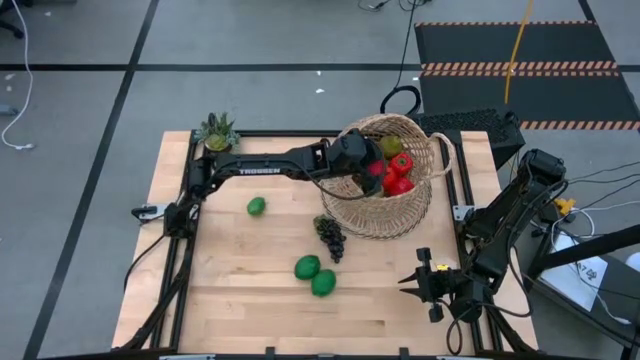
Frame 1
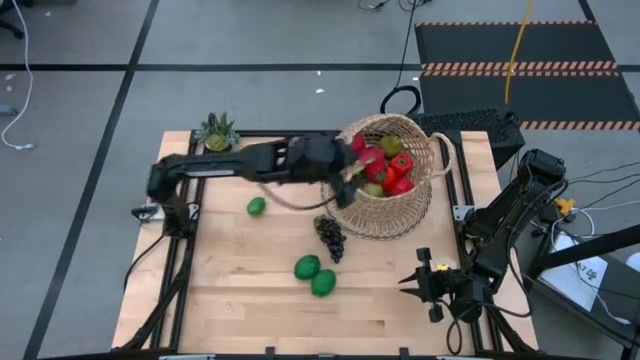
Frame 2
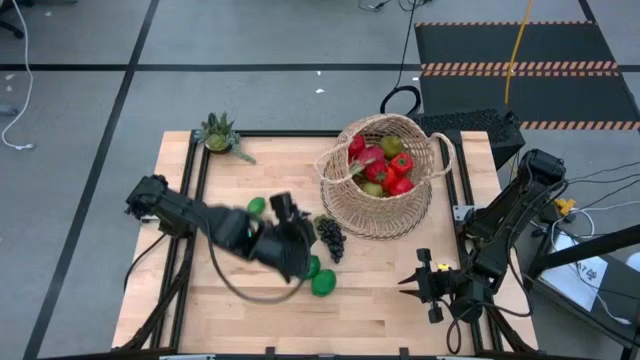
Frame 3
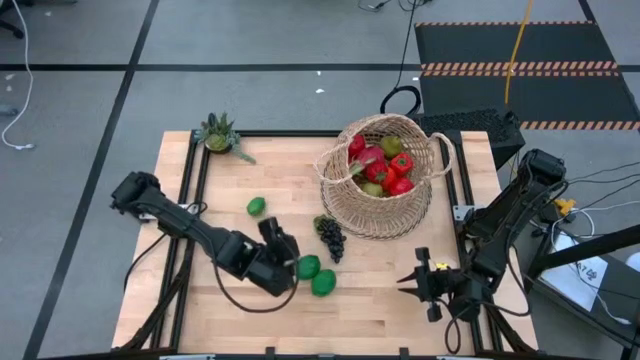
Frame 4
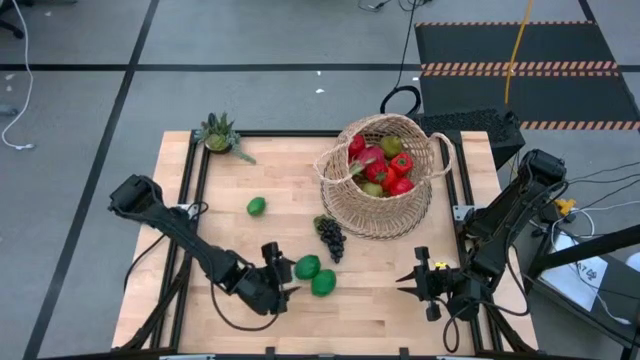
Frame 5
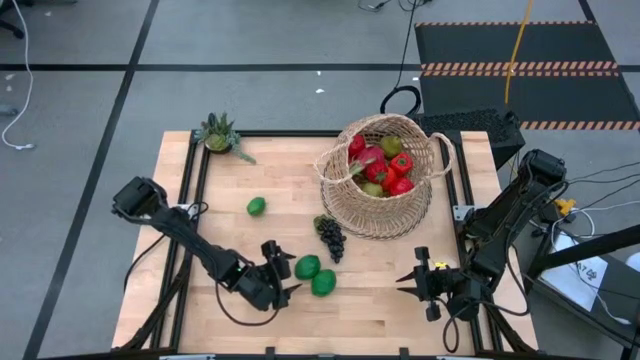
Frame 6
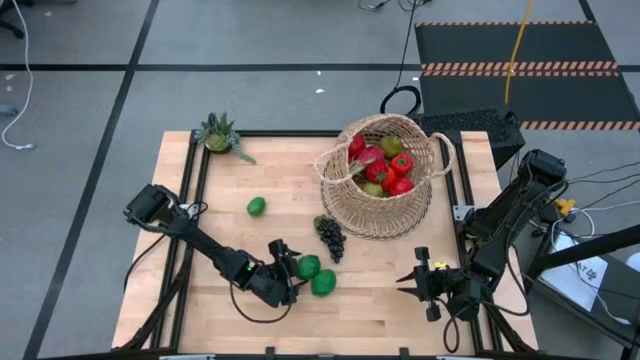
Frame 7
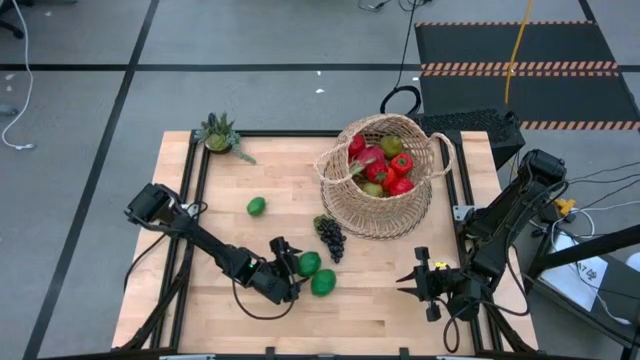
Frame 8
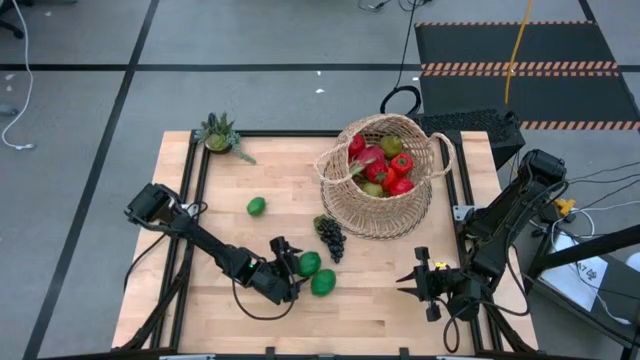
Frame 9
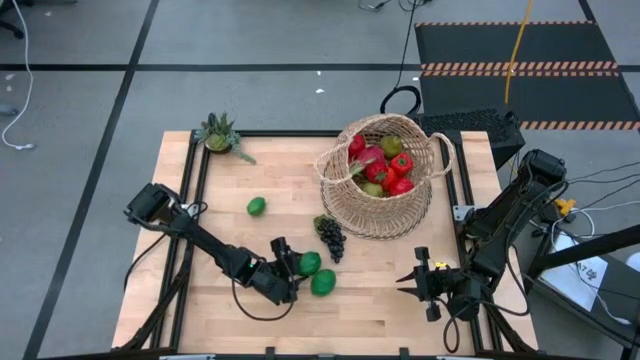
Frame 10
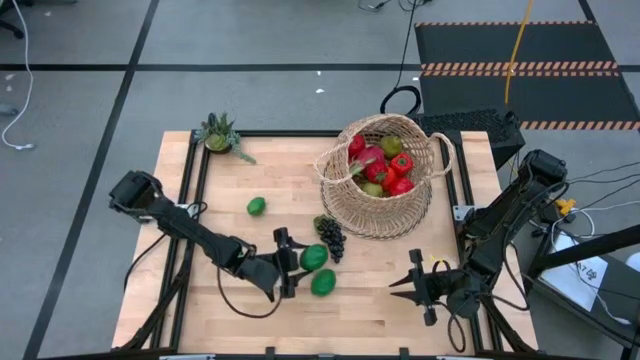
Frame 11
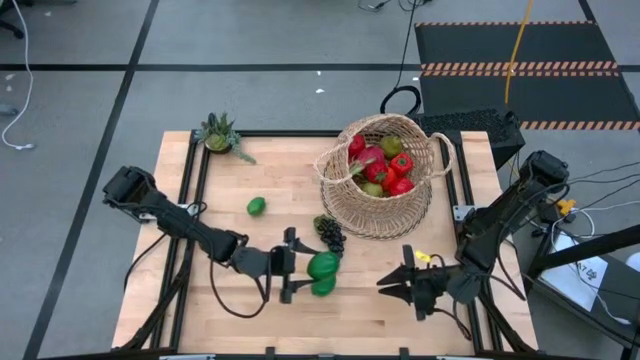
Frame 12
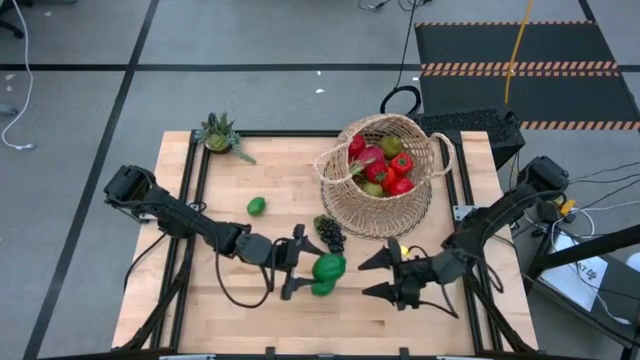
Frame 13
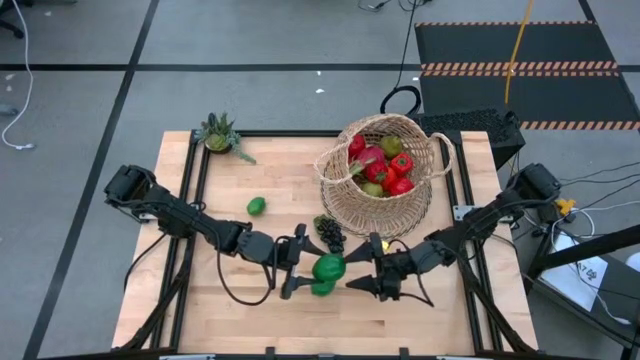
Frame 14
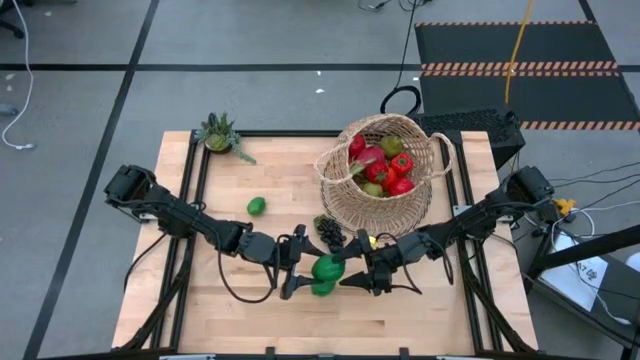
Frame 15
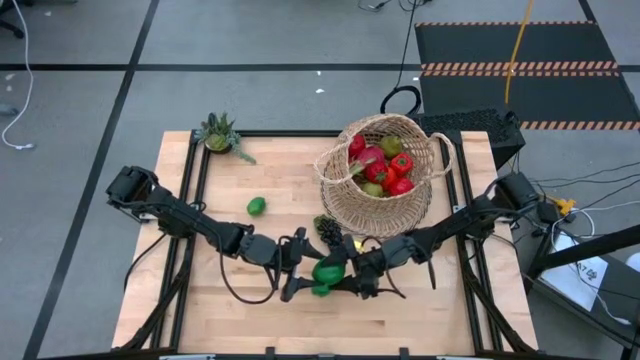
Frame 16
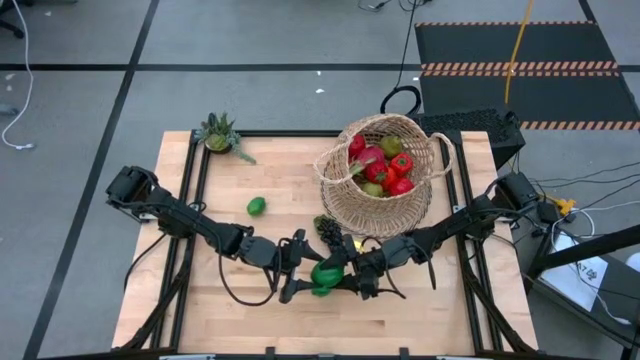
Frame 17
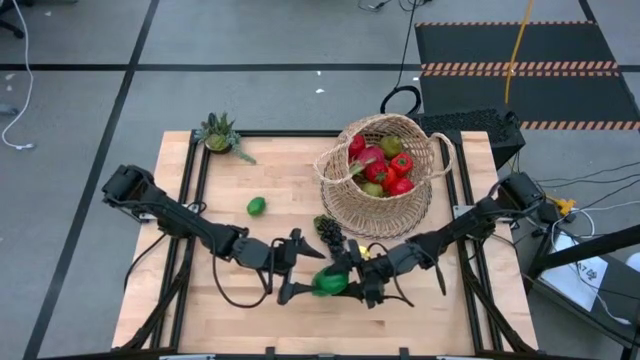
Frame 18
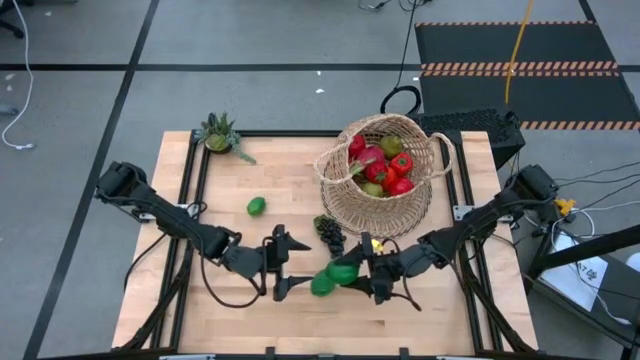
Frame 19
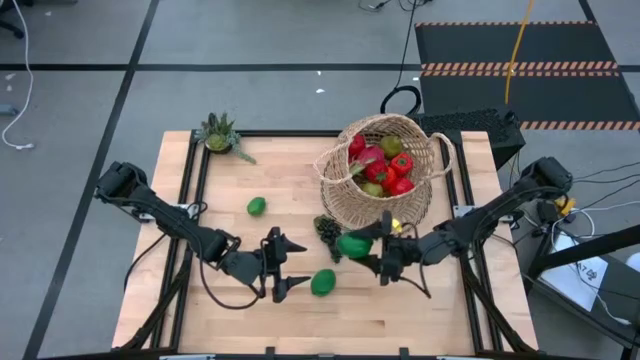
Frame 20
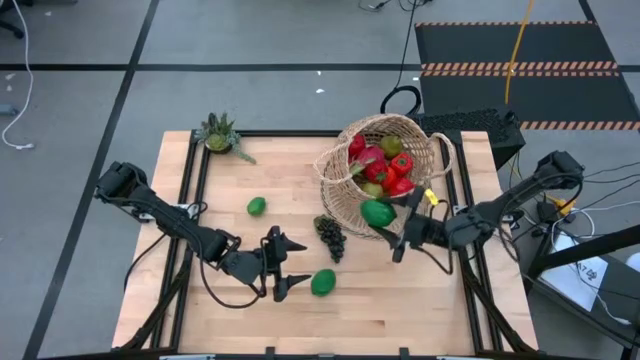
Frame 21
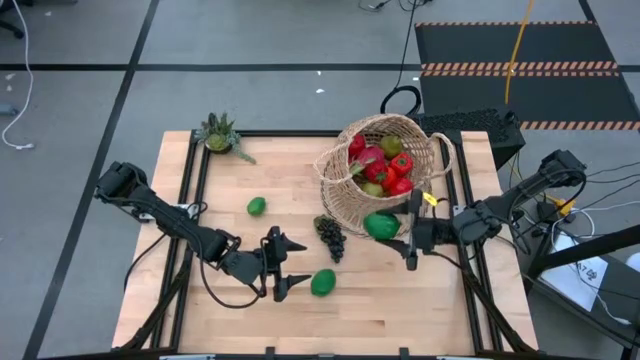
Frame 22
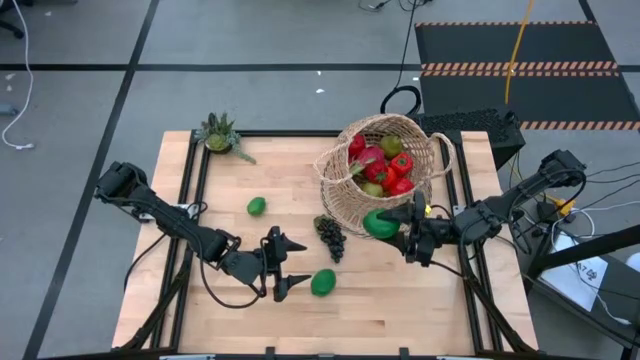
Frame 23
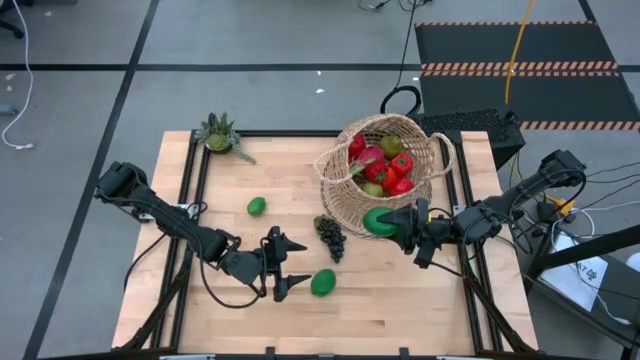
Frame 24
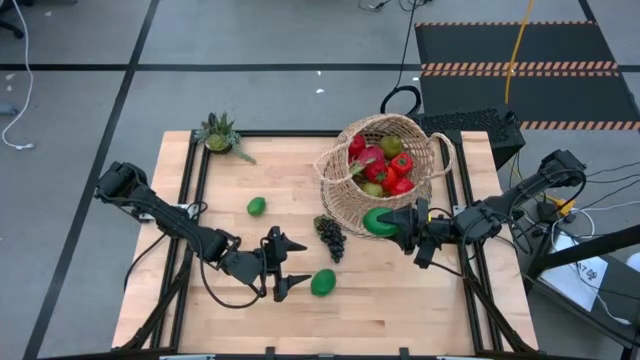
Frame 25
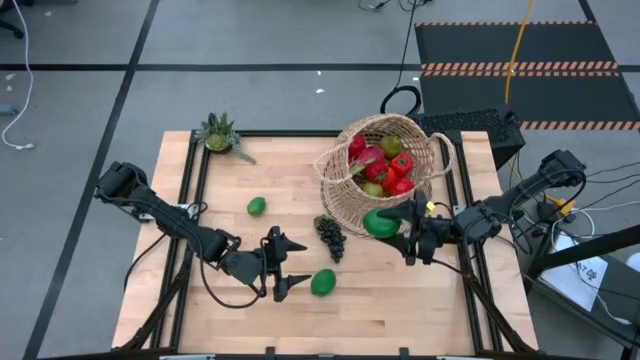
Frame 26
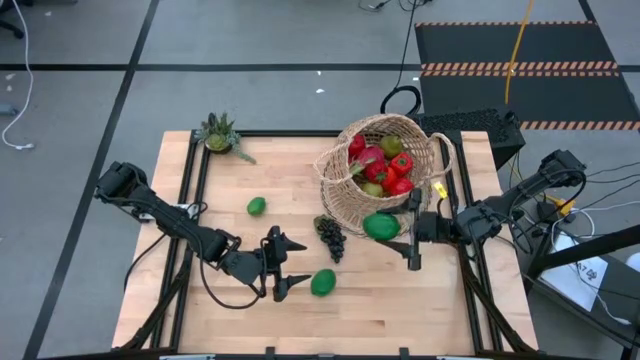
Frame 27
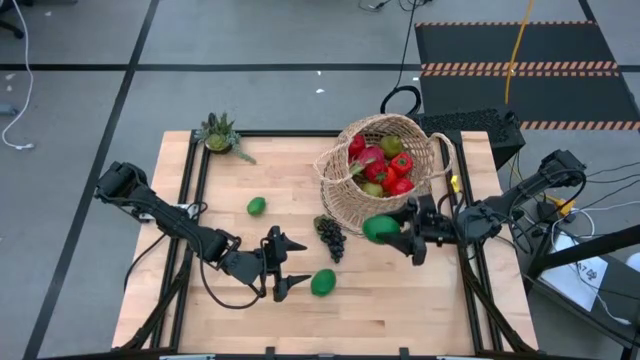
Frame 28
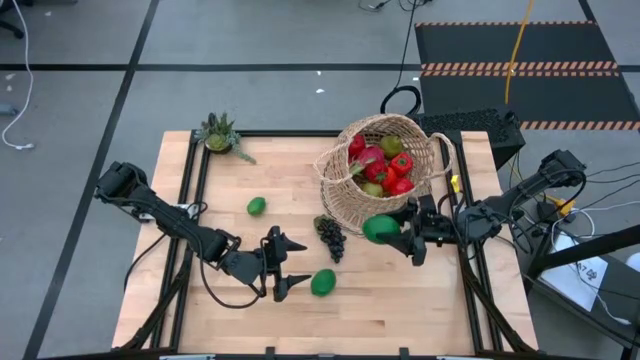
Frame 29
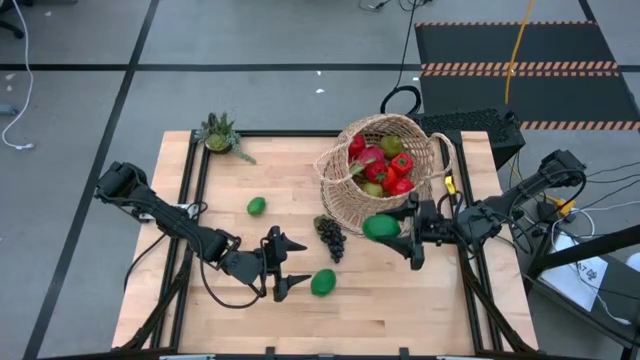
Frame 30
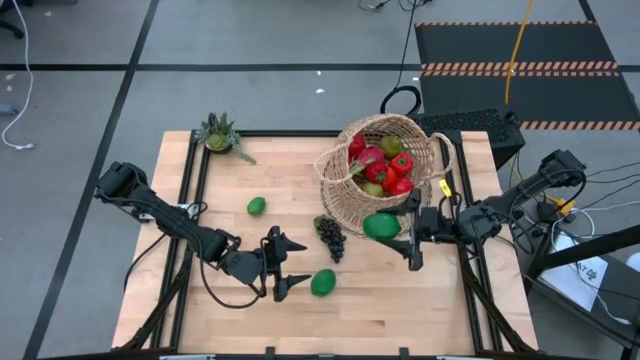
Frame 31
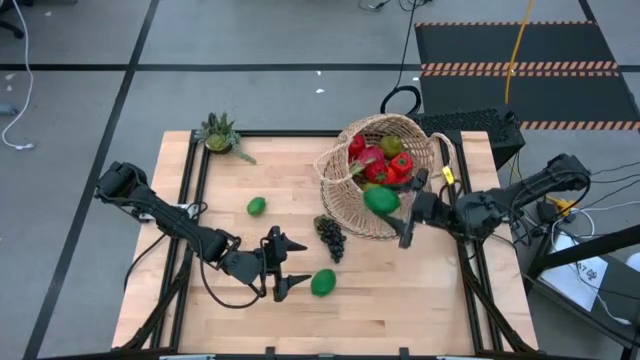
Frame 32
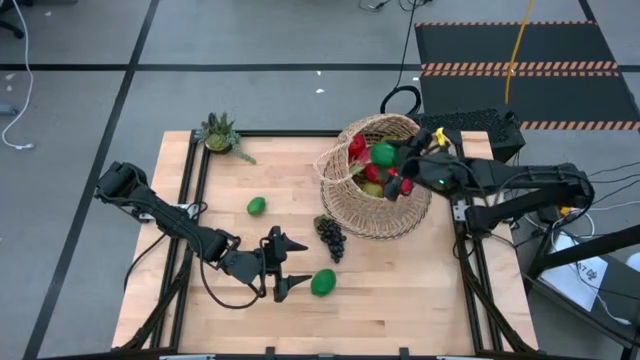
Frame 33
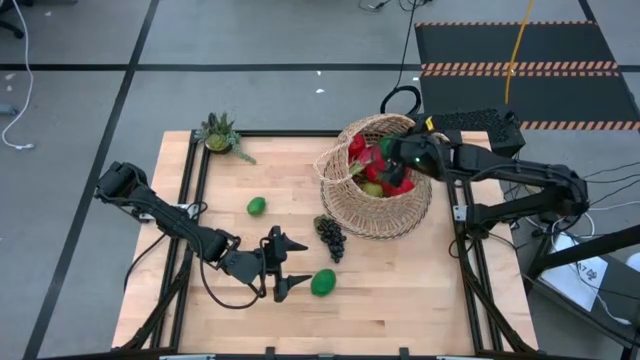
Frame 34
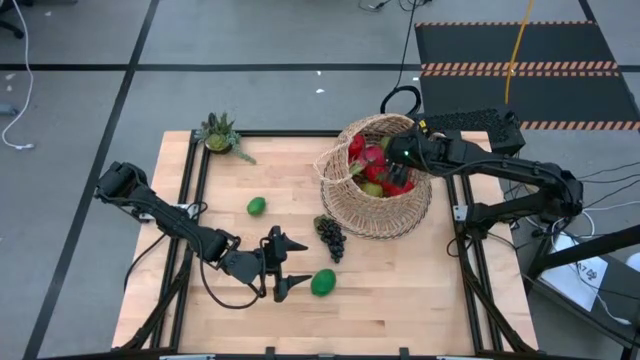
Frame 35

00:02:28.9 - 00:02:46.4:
Task: Build produce basket
Put the green lime into the brown basket

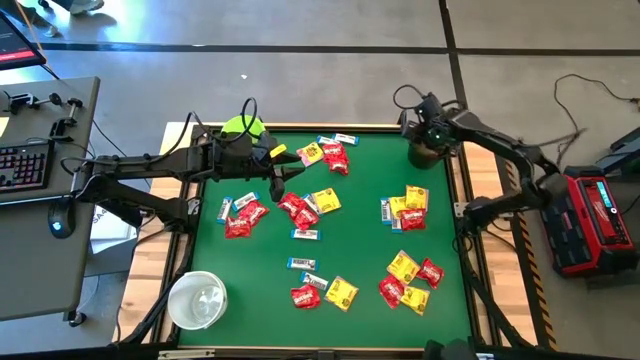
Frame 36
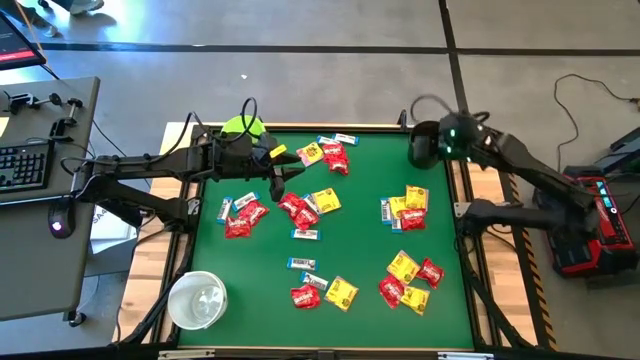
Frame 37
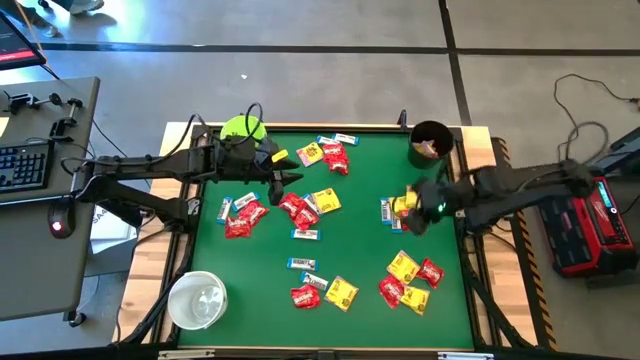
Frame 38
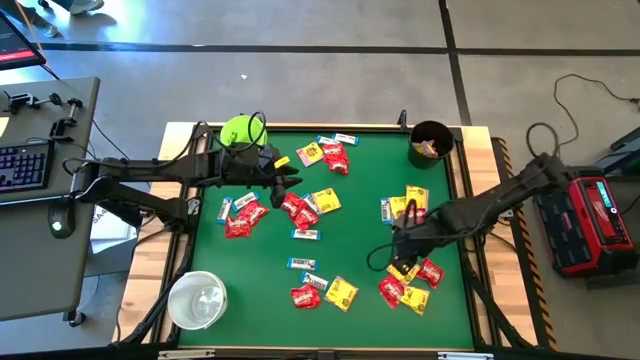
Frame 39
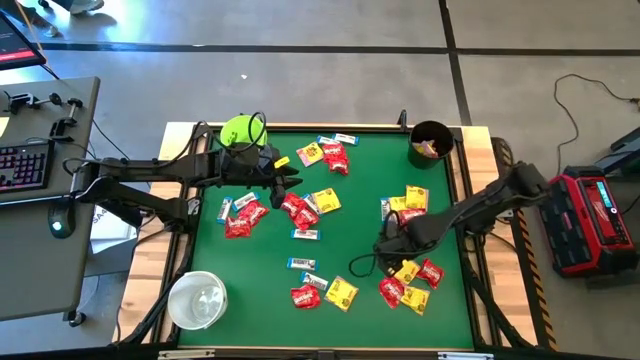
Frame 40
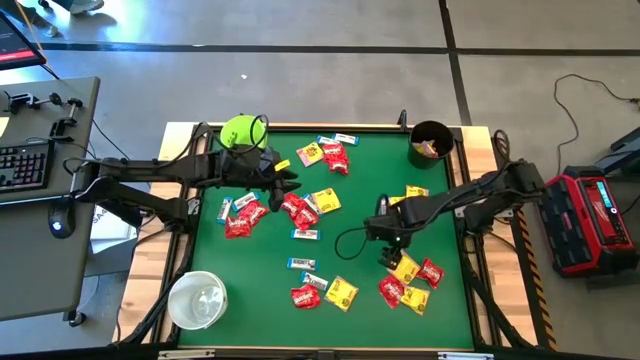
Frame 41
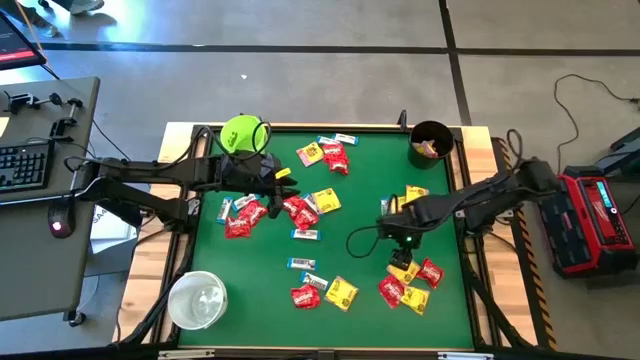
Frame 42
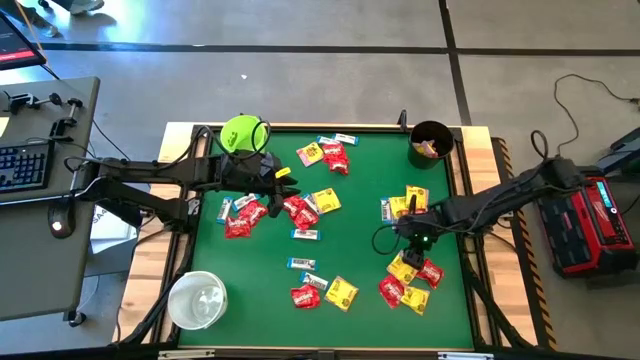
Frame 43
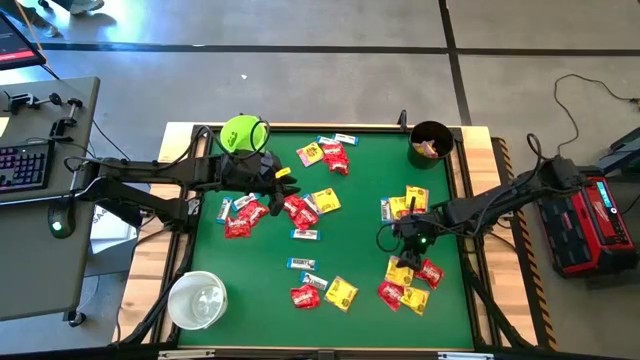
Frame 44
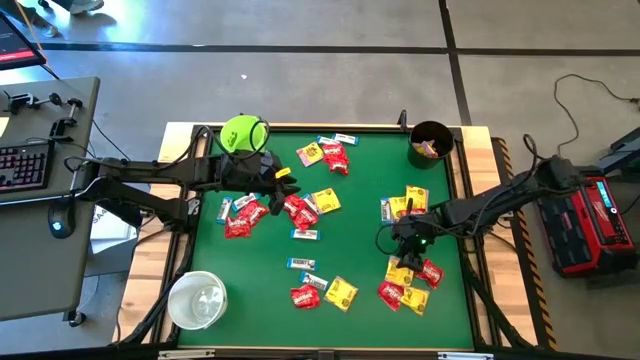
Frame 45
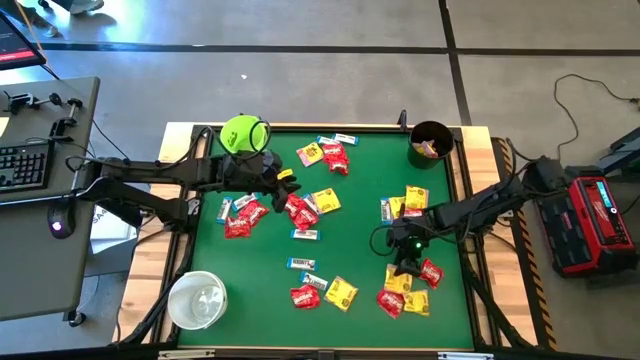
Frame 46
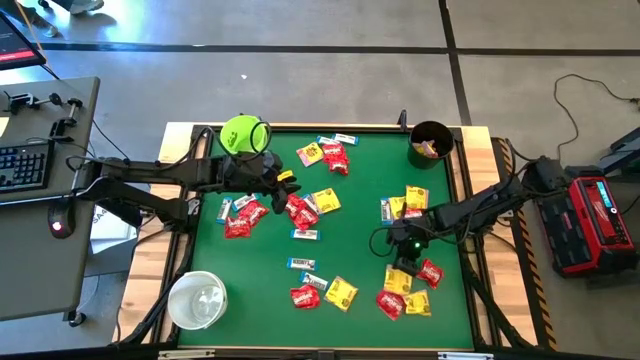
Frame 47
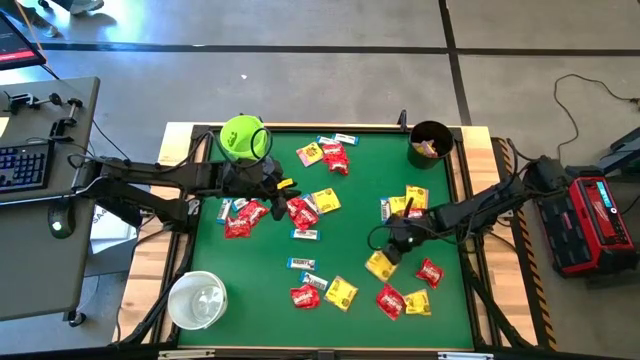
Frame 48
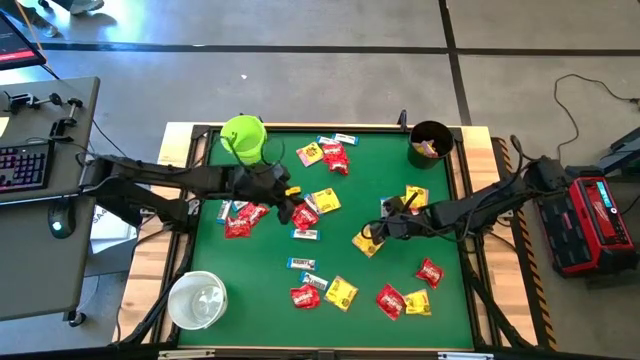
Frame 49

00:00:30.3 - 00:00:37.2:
Task: Sort candy by brand, put in halloween buckets
Put the yellow candy into the black bucket
